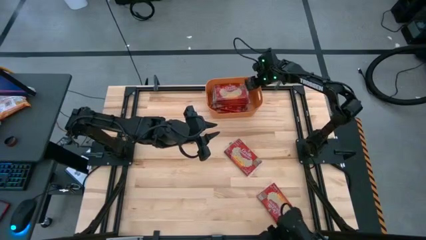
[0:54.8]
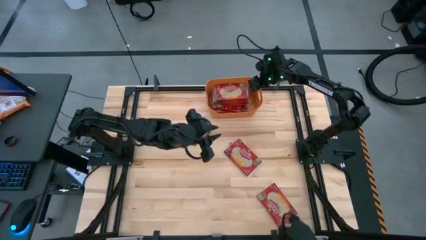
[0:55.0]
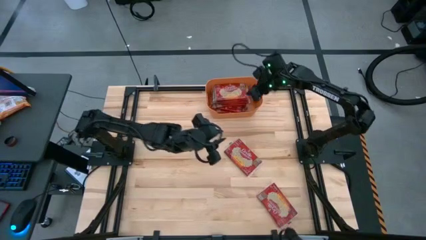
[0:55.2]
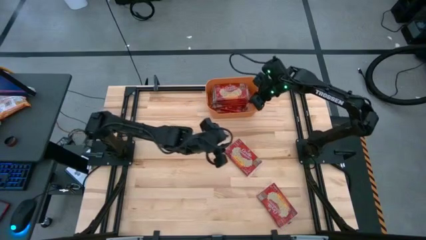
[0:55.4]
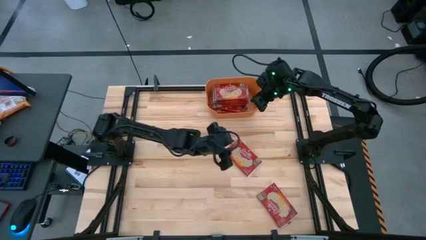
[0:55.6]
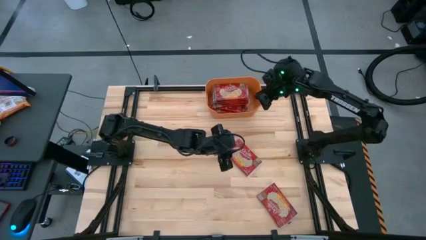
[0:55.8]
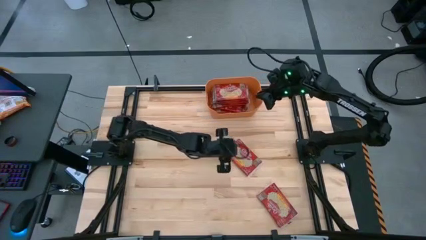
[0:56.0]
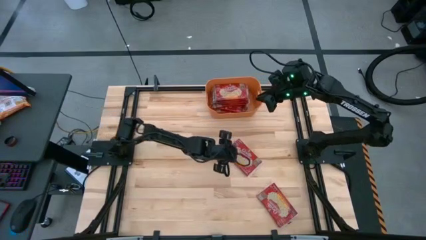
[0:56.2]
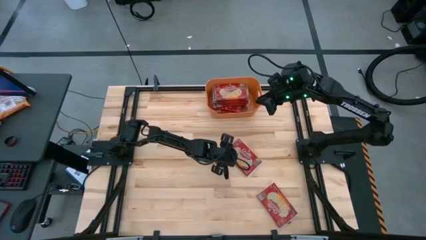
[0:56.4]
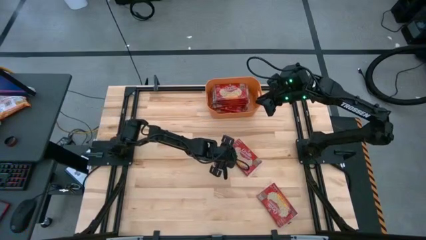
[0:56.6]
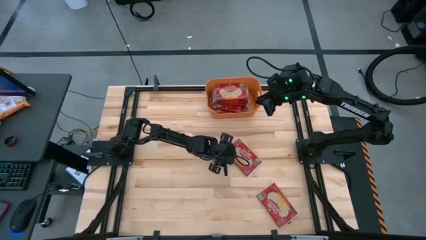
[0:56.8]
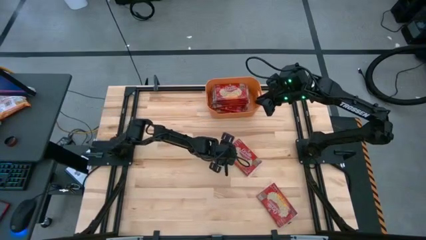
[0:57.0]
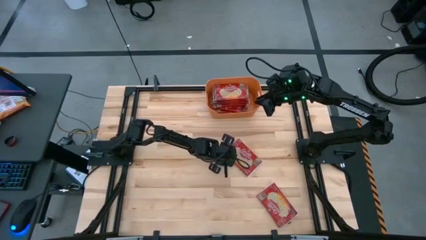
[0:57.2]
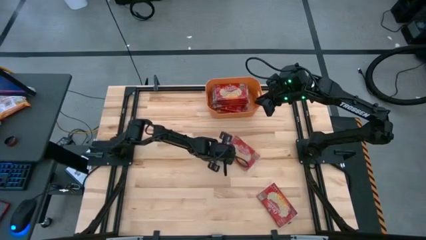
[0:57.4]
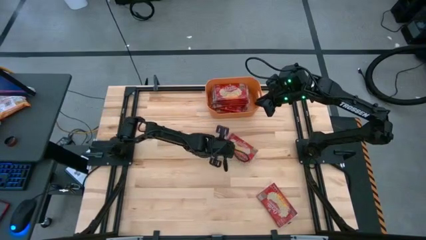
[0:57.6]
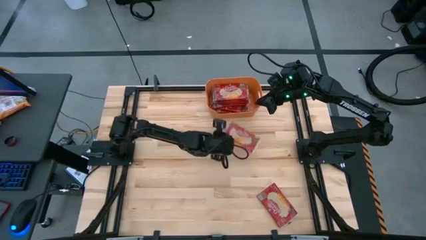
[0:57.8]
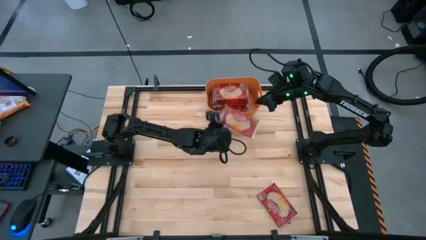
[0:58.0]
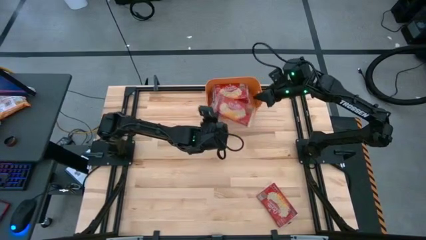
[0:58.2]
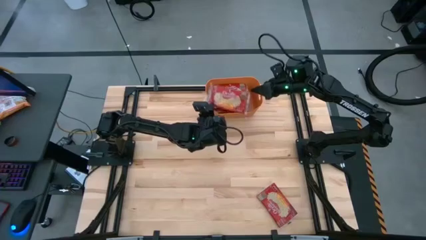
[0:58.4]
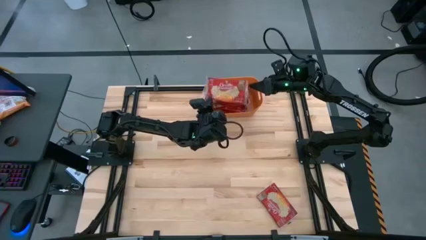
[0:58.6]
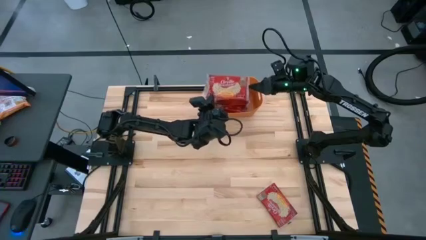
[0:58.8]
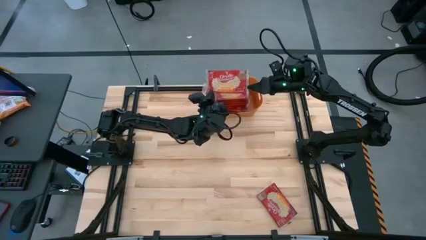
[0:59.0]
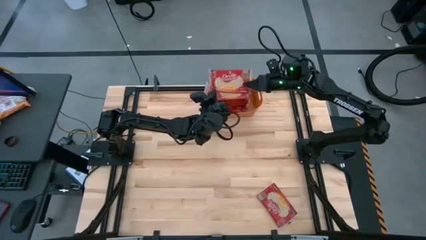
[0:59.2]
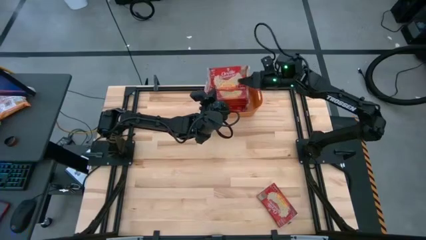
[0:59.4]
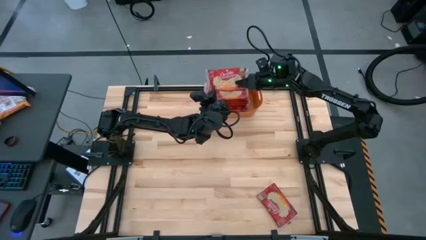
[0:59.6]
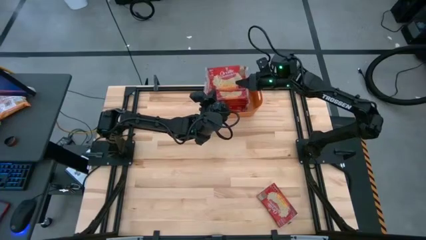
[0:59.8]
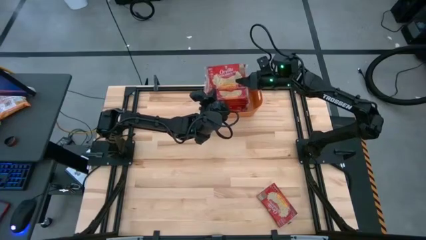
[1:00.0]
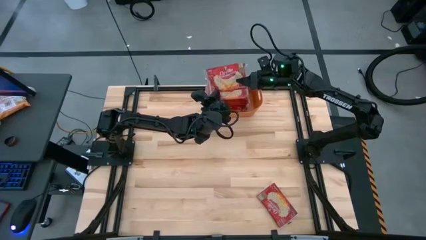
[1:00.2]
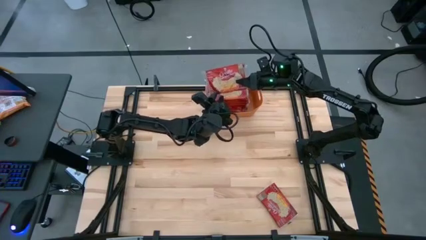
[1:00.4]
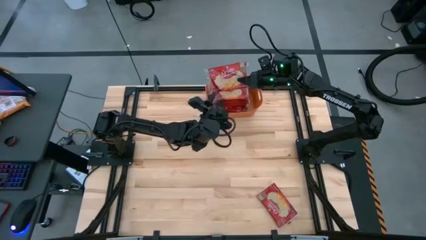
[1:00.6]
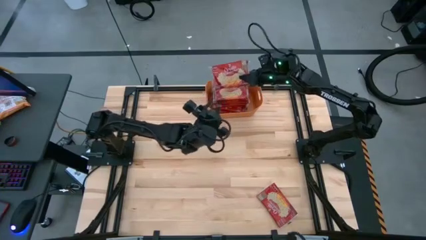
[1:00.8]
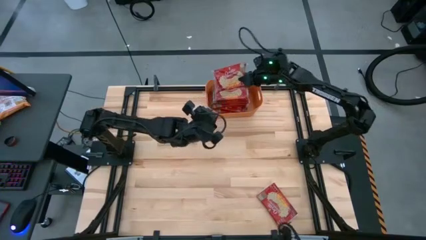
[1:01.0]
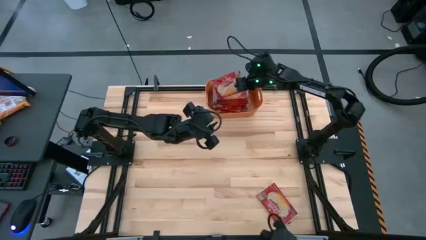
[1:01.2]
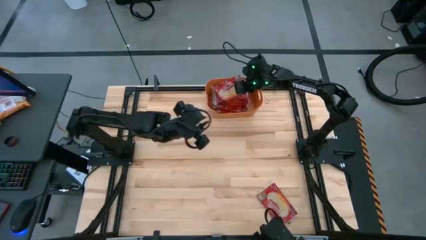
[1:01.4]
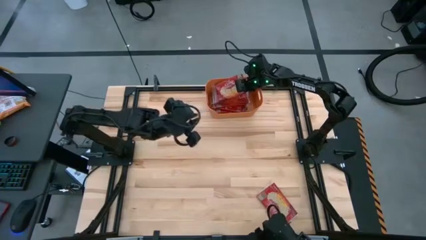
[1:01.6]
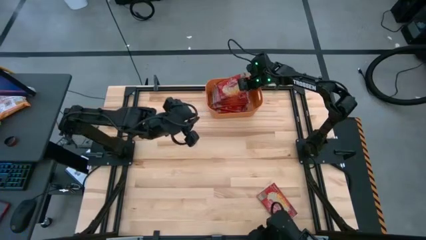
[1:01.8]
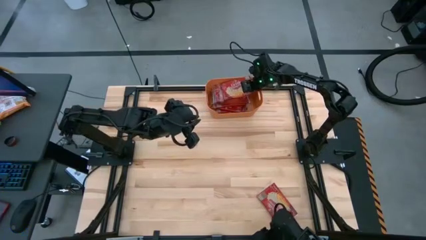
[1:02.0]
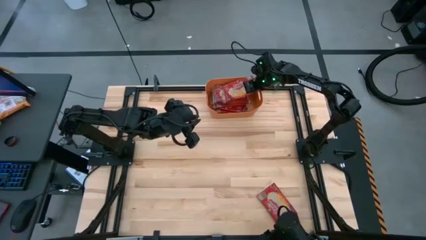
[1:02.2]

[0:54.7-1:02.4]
Task: Sort popcorn bags into baskets
Put the popcorn pack into the orange bin

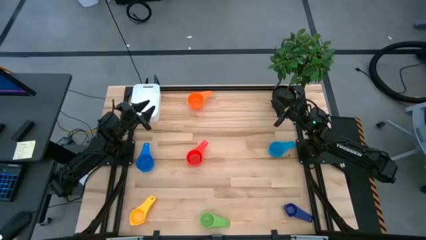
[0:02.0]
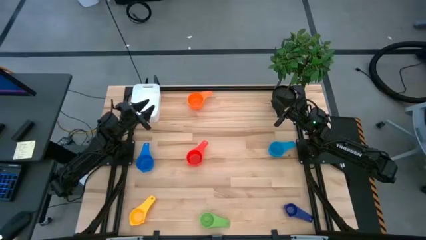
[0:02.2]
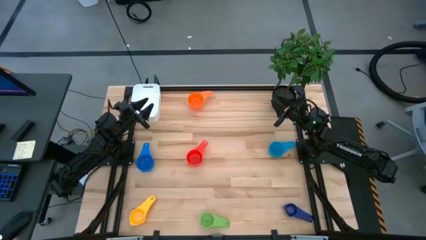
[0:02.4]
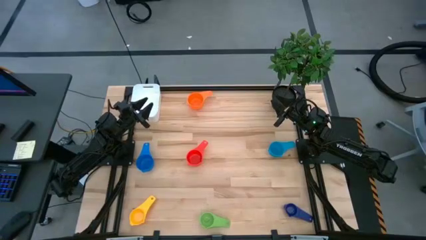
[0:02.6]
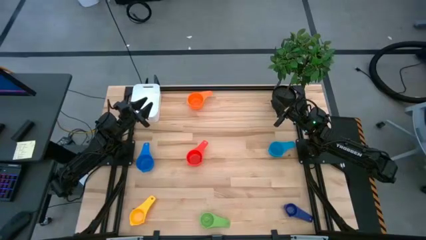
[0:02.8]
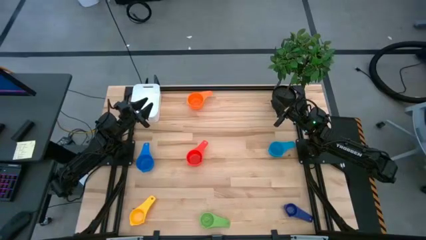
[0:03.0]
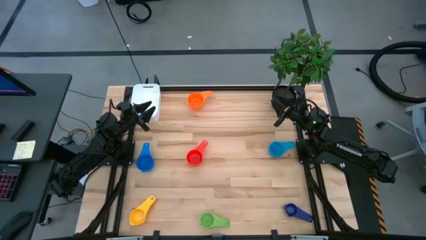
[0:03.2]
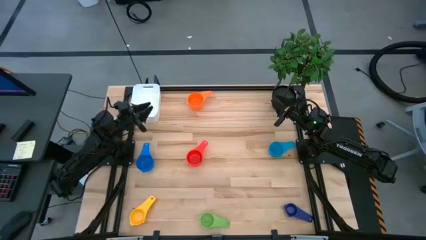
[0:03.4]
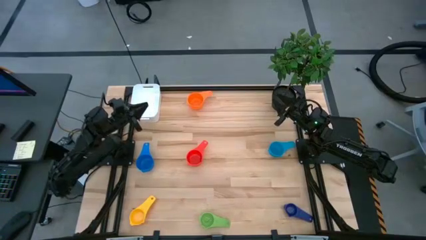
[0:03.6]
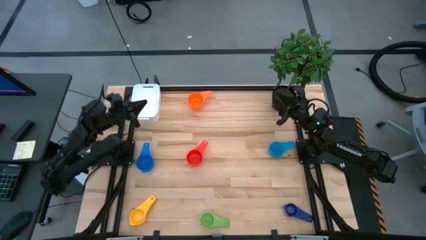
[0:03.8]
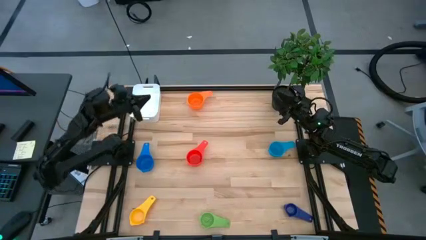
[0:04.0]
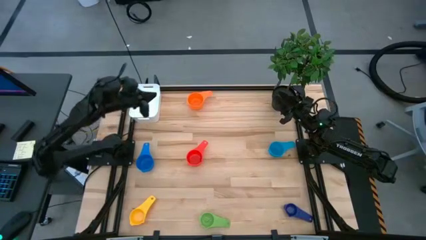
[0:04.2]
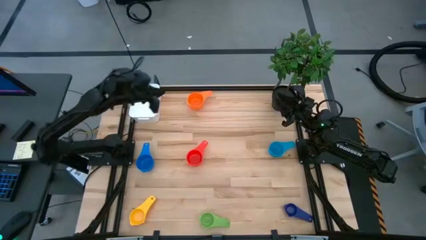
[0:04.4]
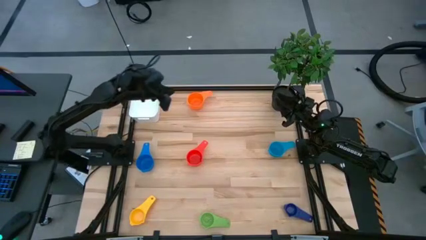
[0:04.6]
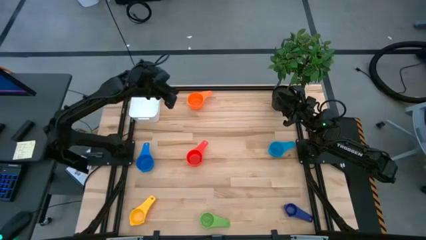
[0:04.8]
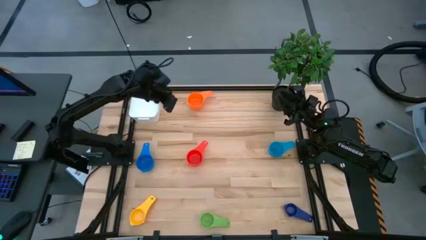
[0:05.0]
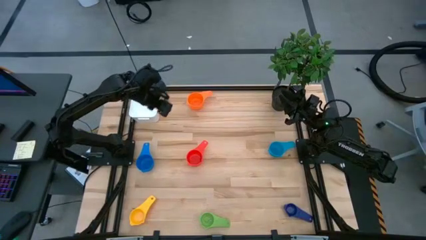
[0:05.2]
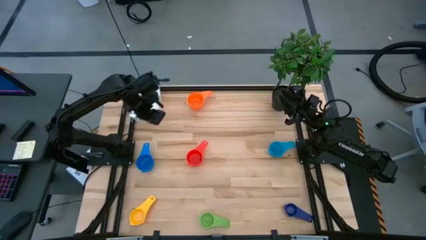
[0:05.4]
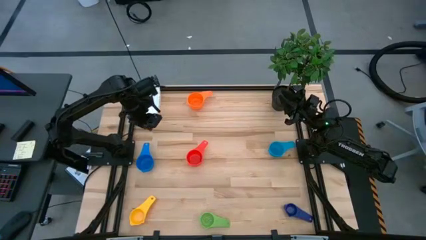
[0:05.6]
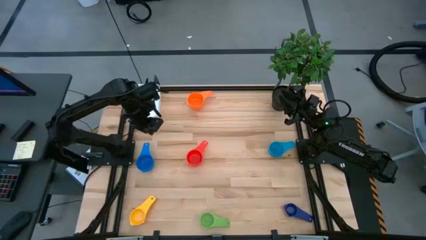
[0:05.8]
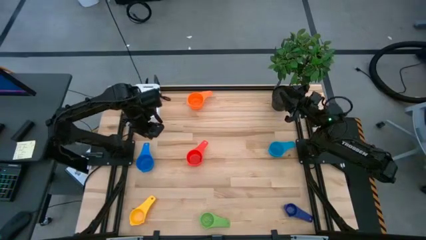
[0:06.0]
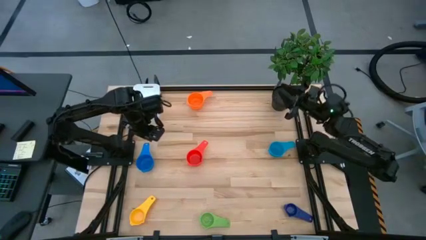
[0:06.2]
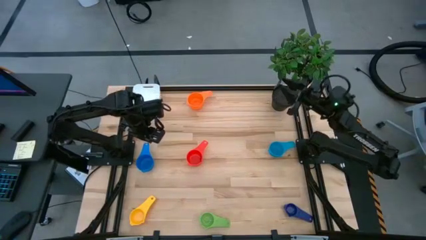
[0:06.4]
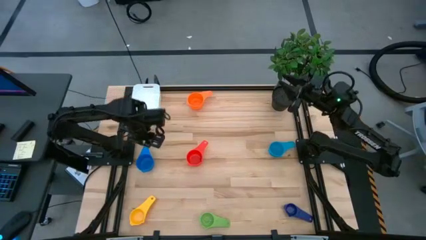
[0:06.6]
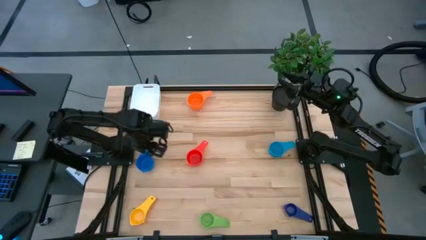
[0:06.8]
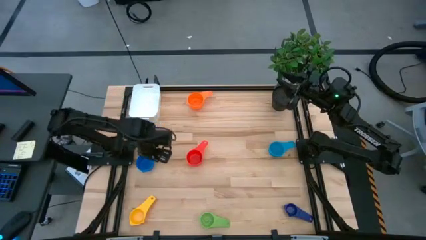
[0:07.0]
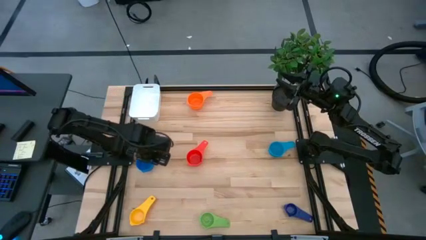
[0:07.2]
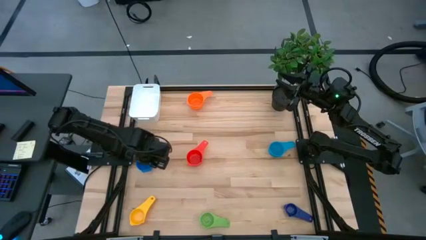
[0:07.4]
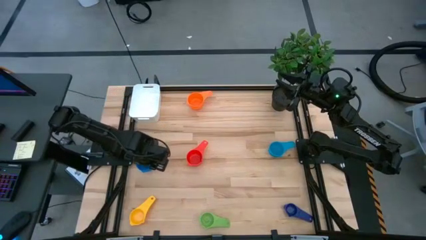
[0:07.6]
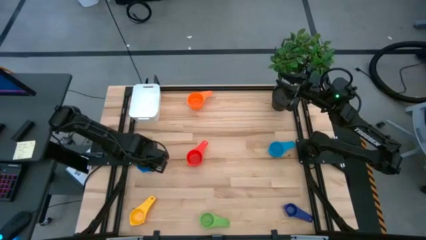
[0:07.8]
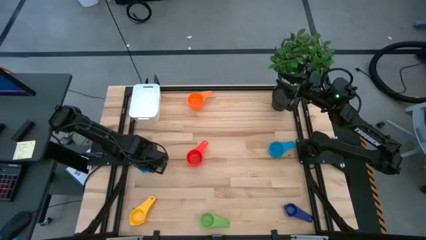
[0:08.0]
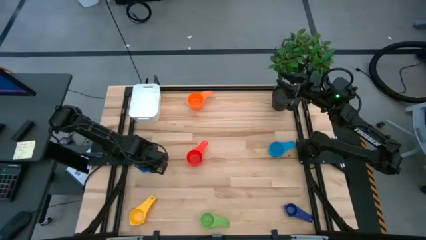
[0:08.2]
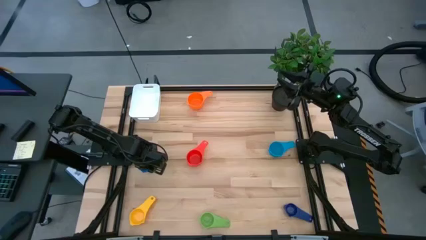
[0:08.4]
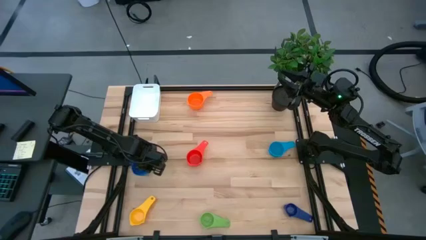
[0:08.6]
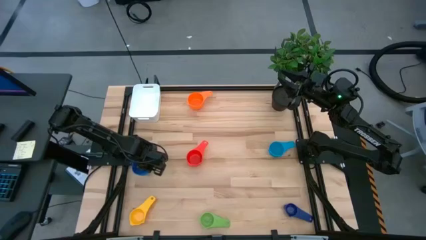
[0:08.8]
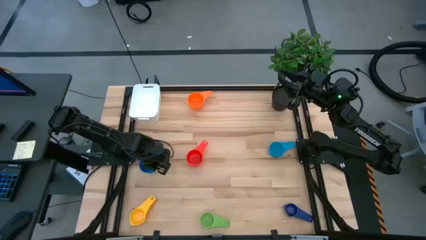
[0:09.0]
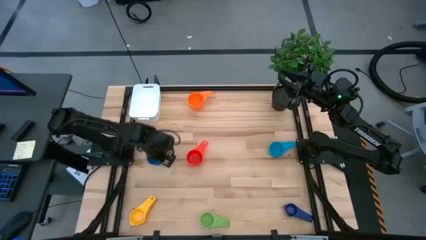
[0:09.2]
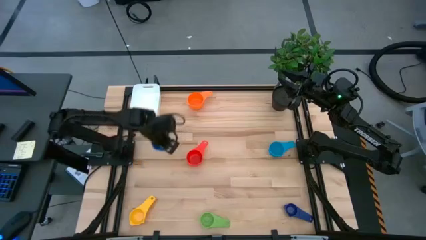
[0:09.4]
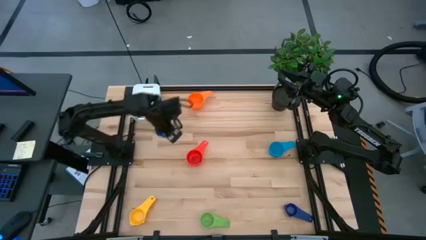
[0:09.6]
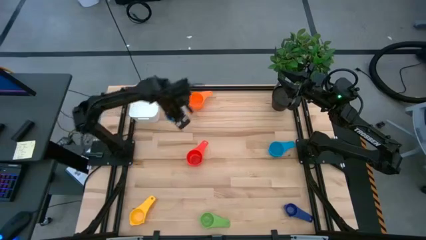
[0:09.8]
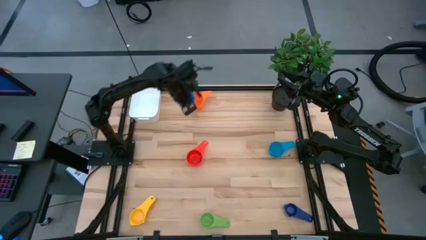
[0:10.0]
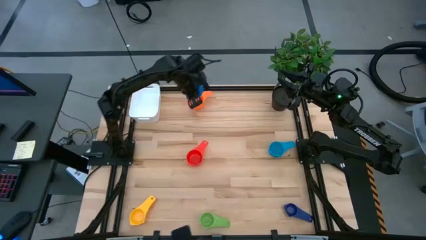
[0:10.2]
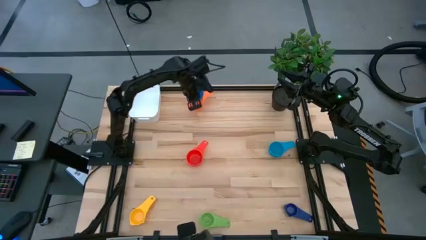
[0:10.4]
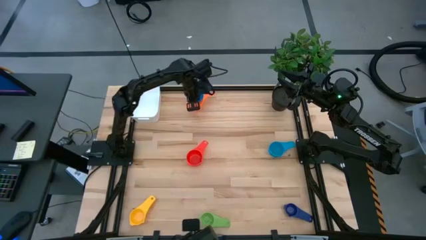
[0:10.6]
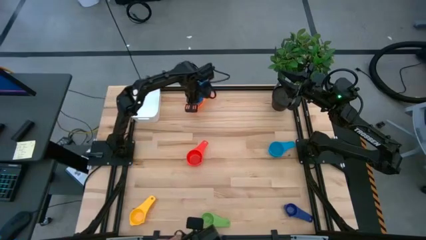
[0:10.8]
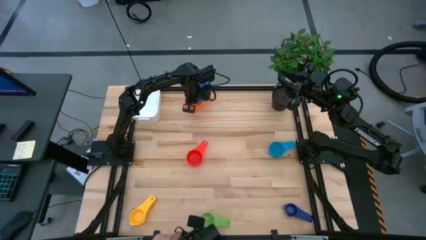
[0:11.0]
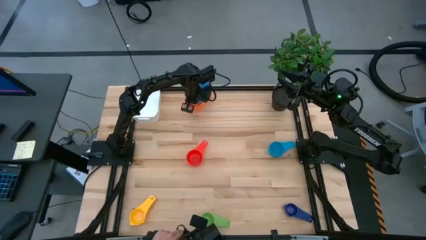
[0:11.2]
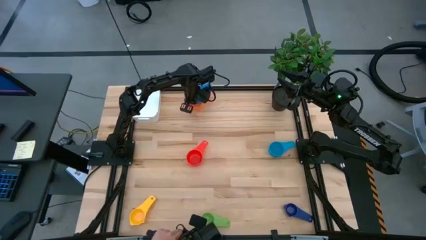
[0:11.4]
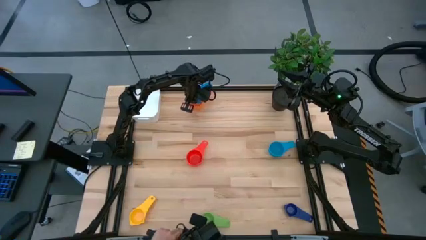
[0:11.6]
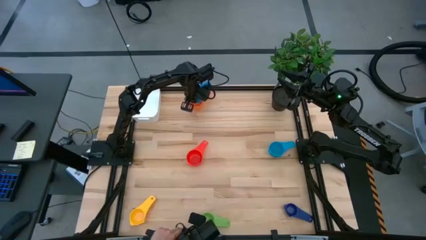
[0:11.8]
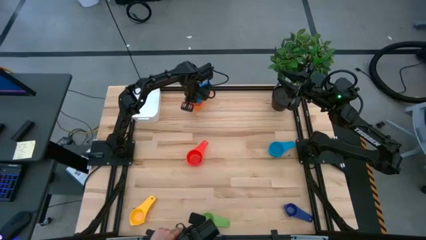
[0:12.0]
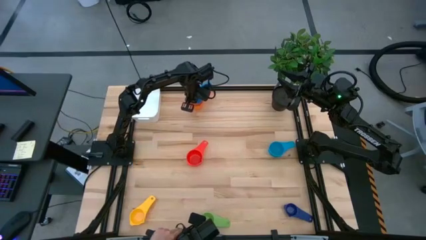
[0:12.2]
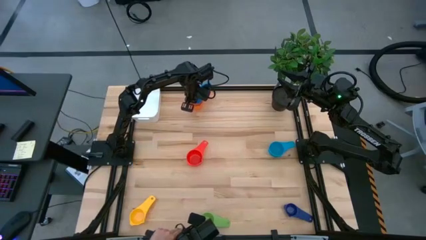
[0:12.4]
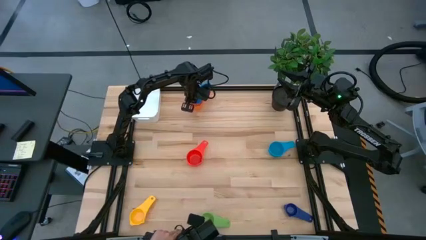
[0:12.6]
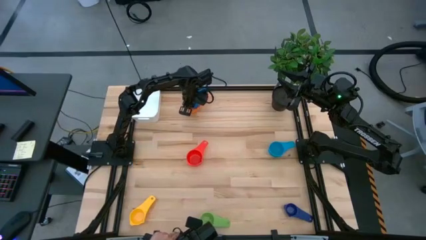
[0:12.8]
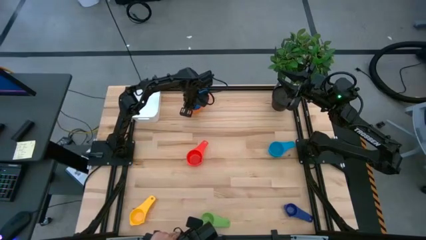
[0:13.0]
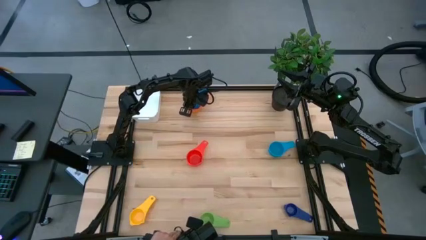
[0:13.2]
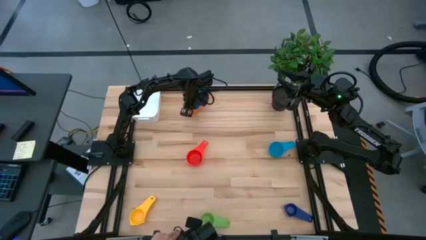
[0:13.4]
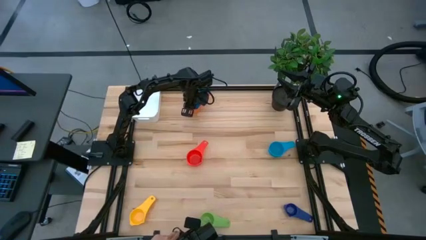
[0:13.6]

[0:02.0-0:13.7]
Task: Nest measuring cups in basket
Stack the blue measuring cup on top of the orange measuring cup
